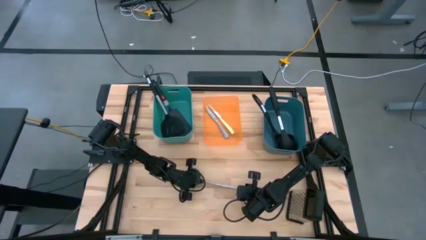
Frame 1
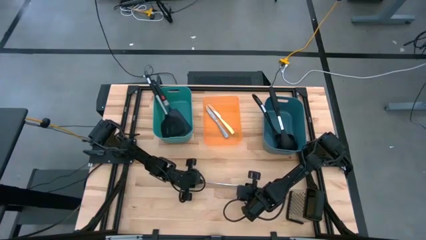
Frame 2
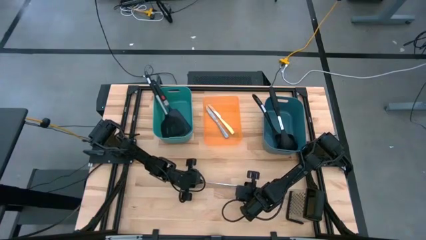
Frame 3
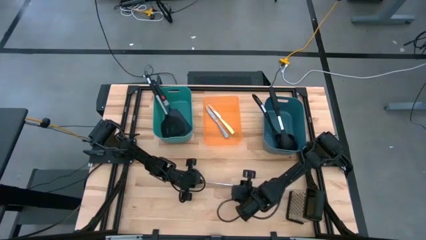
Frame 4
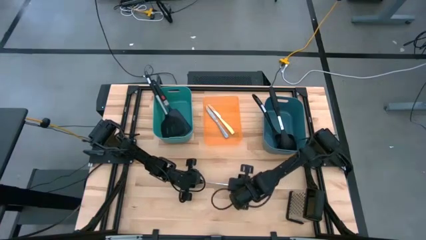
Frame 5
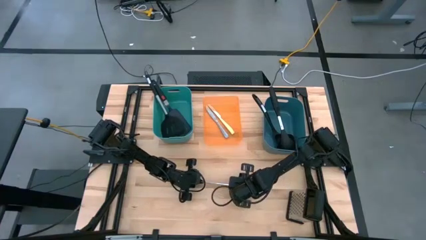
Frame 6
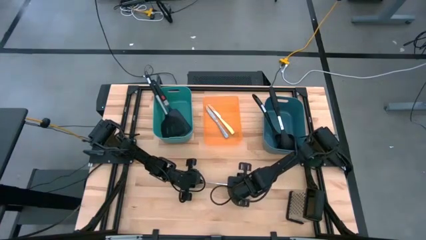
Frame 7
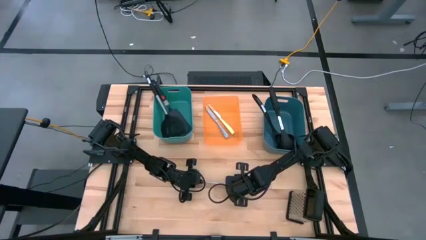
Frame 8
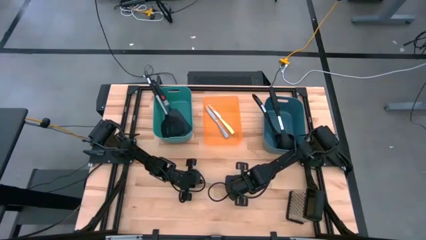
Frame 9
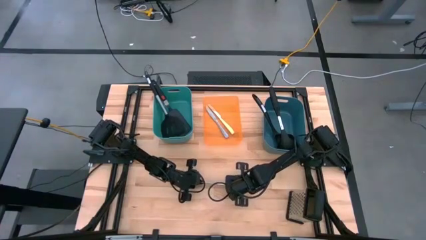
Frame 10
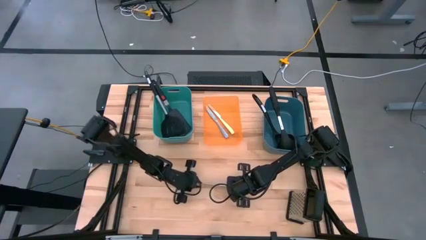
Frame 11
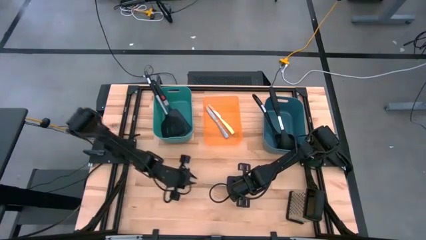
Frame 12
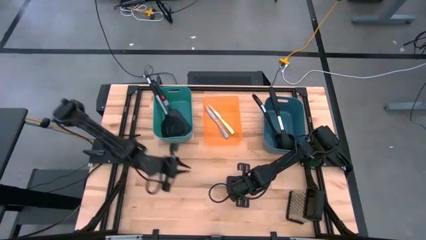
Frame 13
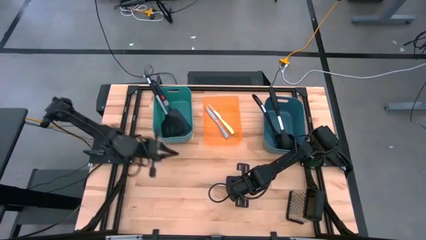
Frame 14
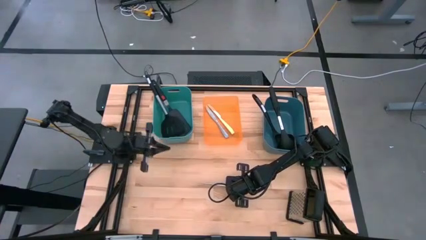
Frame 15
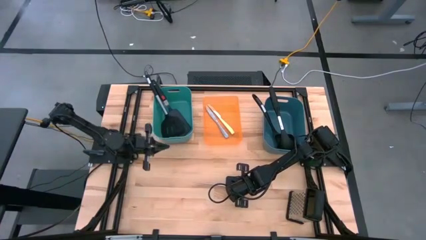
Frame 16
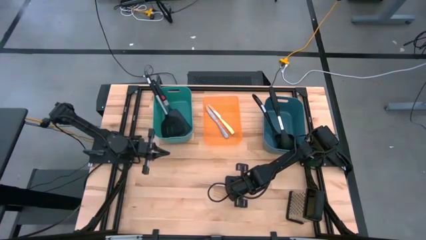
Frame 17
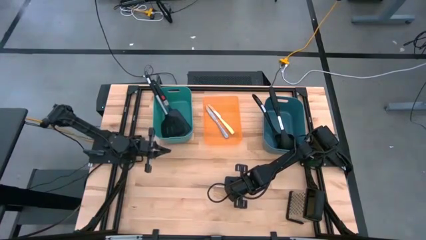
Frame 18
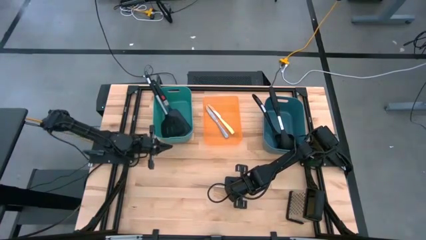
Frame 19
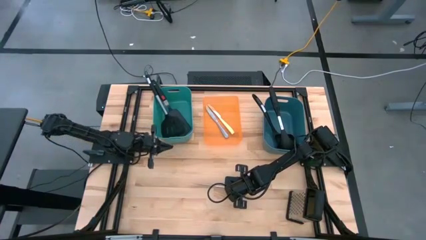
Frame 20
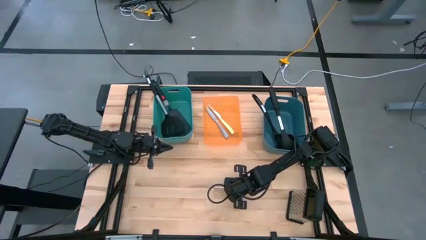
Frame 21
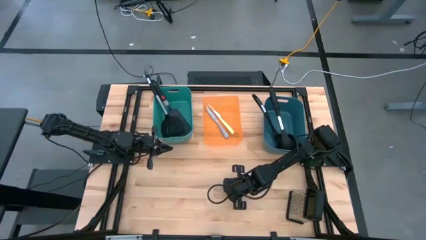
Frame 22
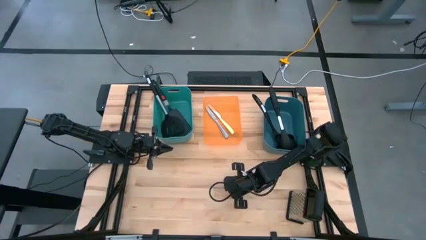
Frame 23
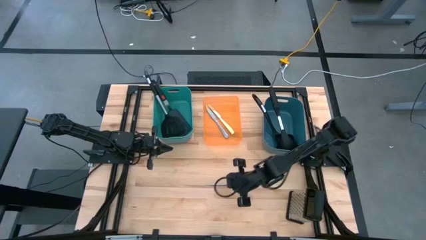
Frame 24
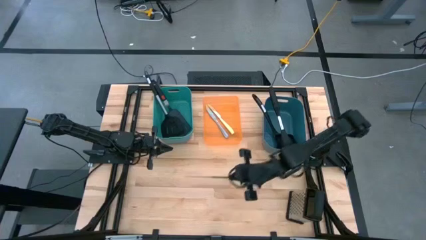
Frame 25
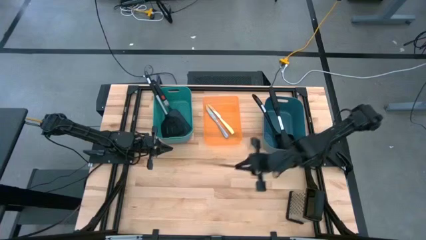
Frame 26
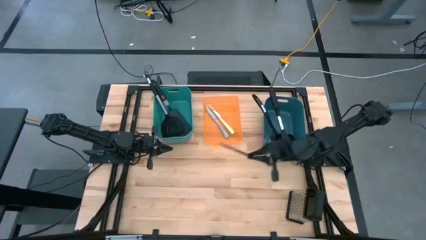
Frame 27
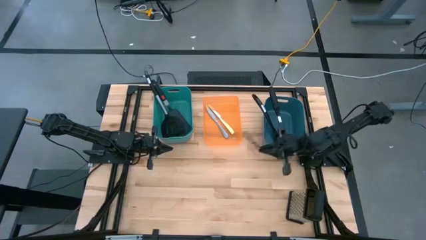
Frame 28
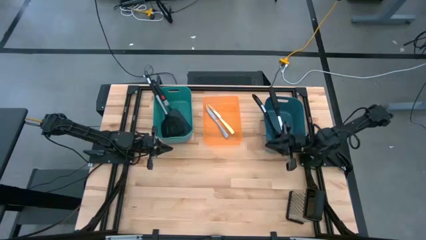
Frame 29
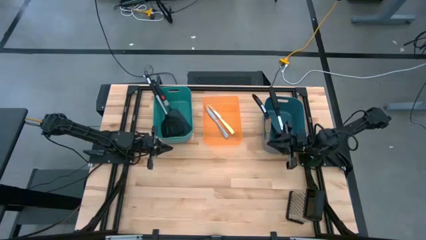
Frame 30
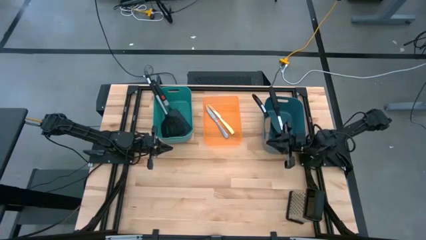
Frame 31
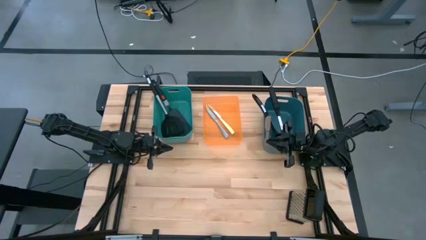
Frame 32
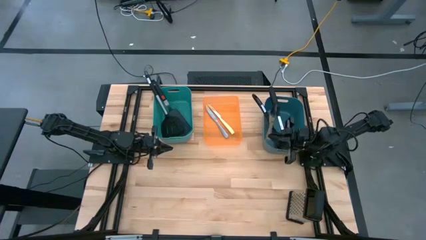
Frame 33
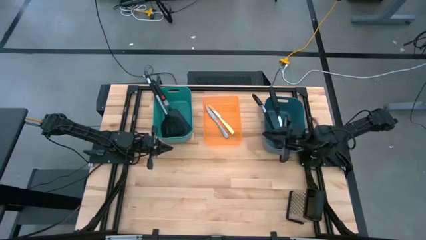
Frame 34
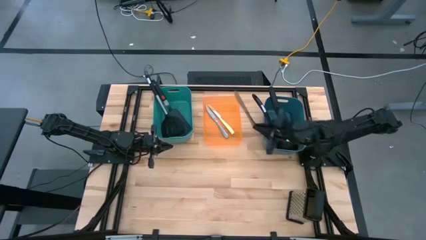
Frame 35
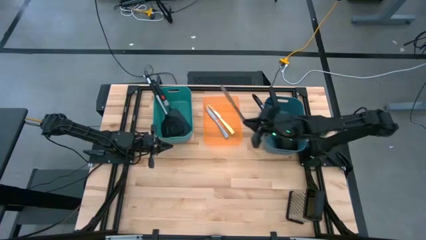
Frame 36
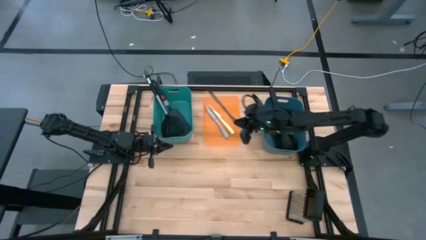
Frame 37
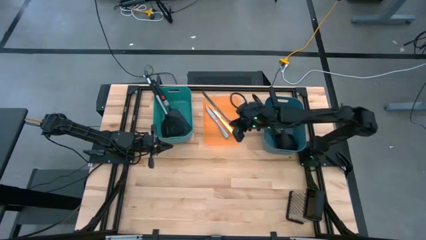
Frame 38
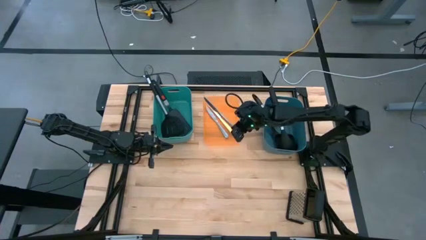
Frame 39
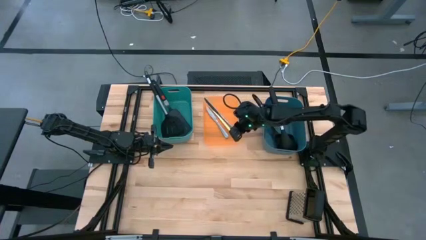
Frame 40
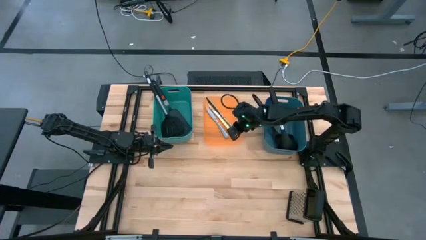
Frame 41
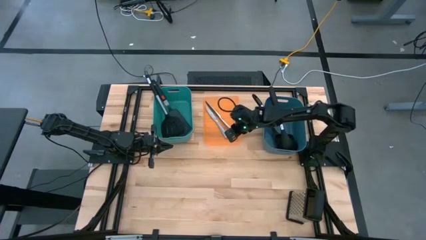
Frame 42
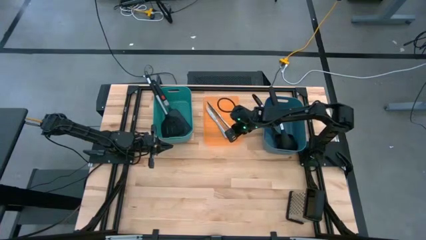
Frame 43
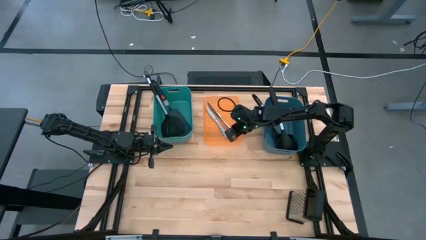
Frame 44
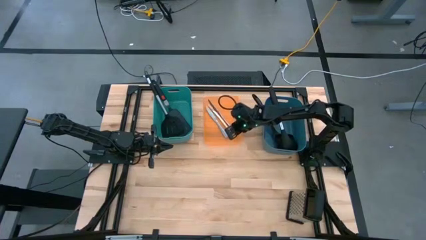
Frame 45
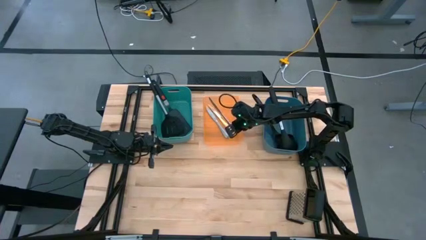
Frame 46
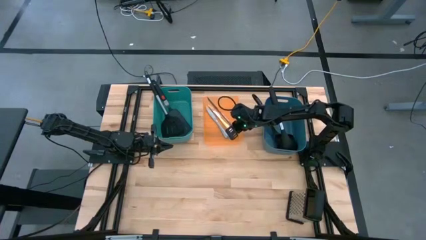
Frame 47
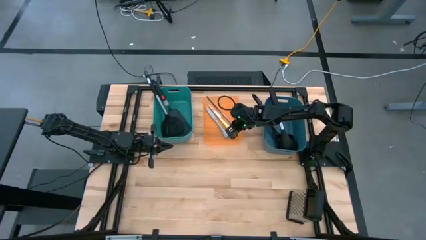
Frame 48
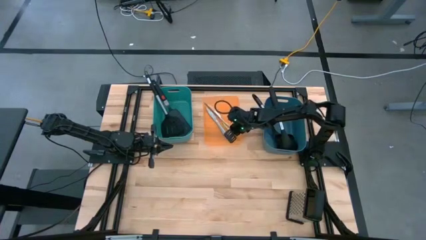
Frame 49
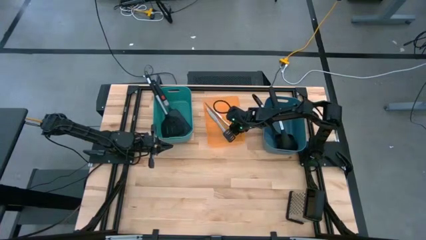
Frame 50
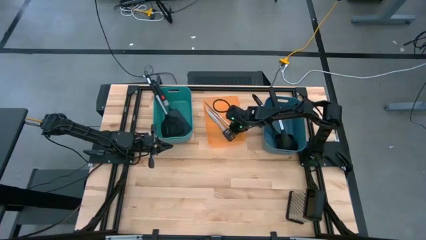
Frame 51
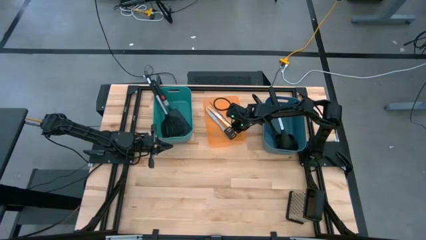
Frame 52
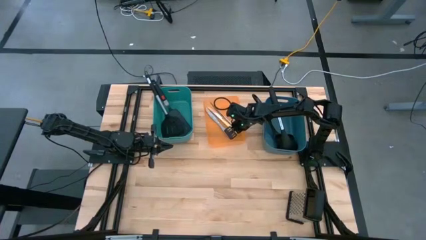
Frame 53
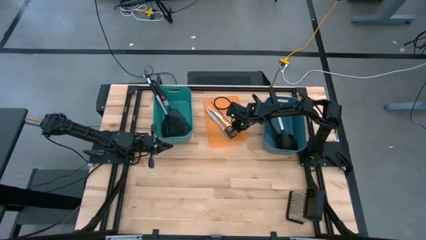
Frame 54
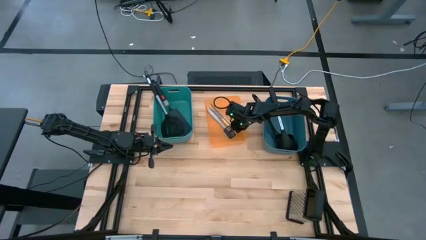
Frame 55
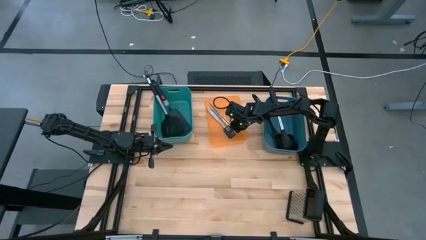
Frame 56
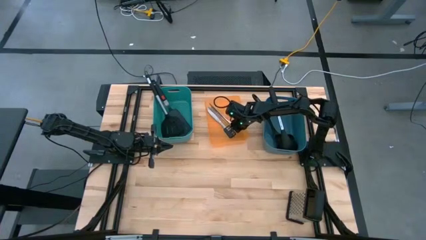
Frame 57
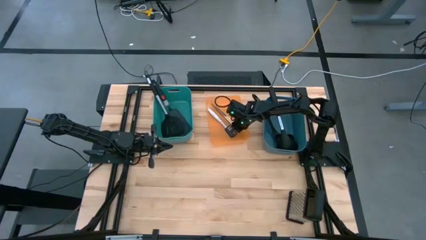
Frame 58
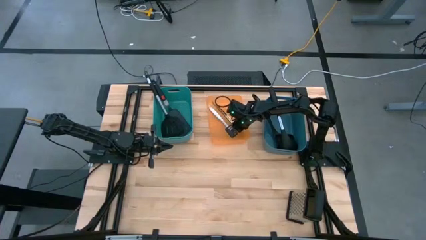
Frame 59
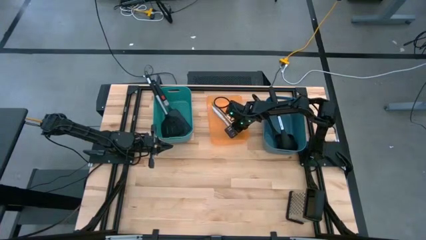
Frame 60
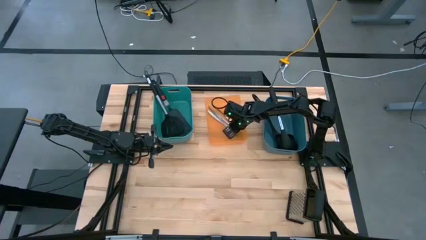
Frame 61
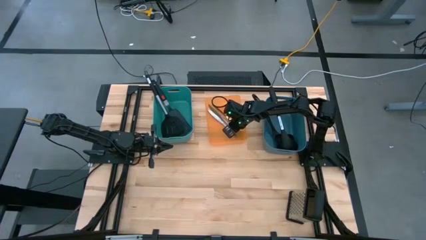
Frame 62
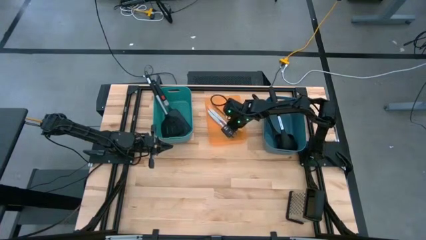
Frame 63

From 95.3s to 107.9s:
Task: Pick & Place Kitchen Items
Put the silver knife into the orange bin

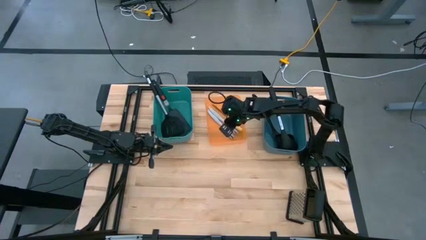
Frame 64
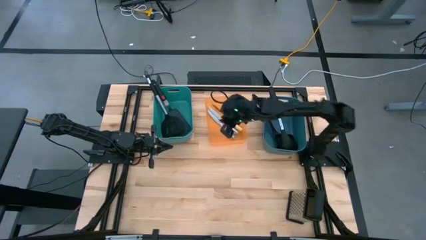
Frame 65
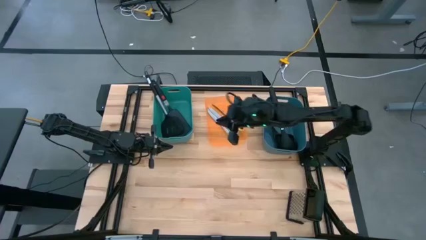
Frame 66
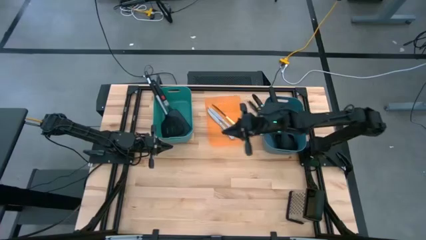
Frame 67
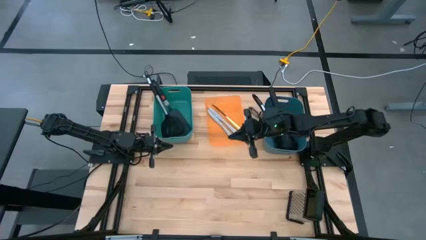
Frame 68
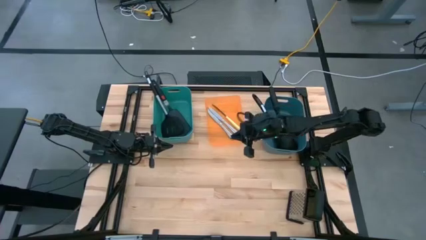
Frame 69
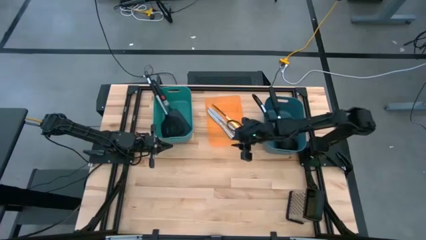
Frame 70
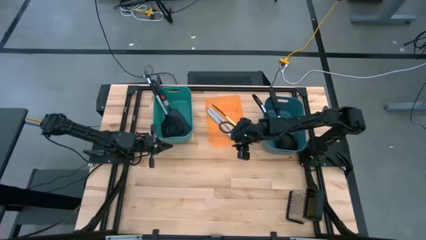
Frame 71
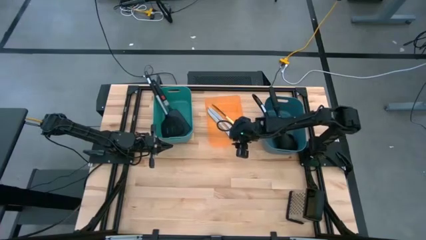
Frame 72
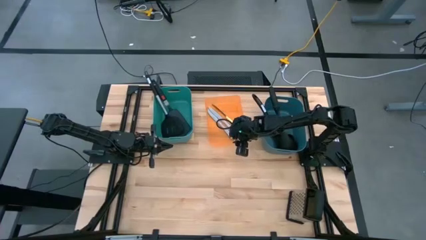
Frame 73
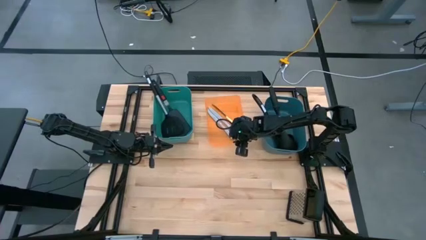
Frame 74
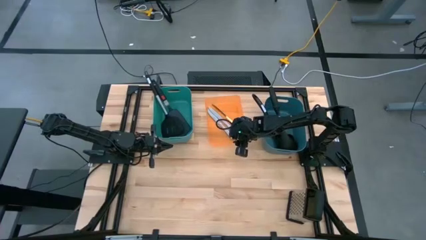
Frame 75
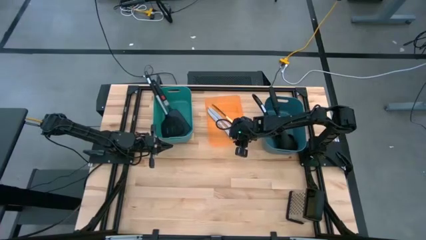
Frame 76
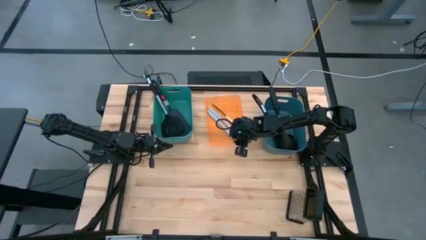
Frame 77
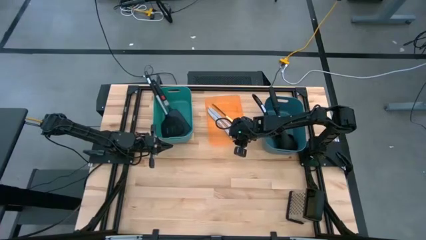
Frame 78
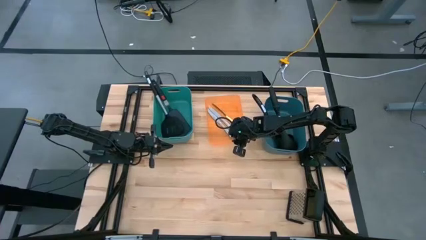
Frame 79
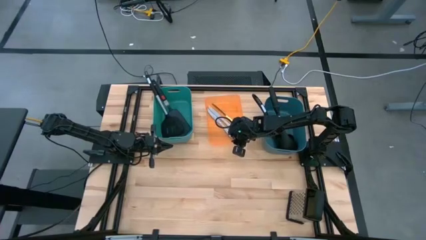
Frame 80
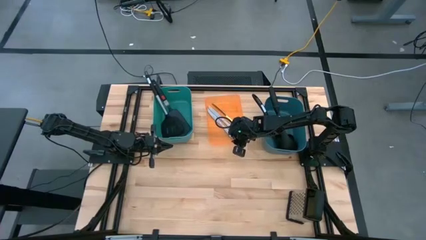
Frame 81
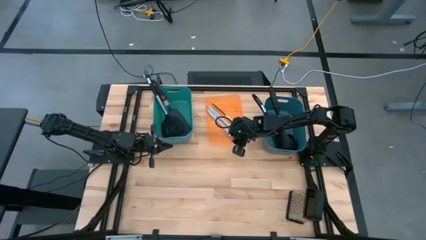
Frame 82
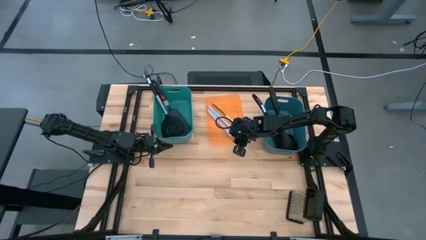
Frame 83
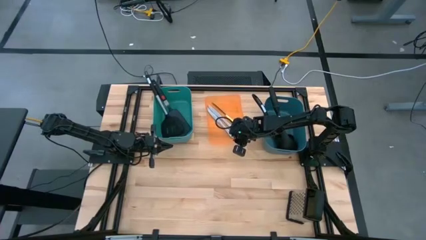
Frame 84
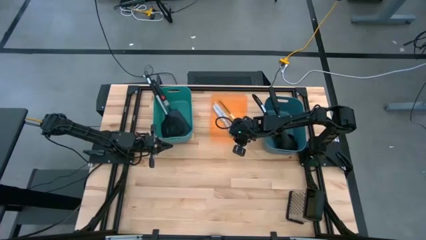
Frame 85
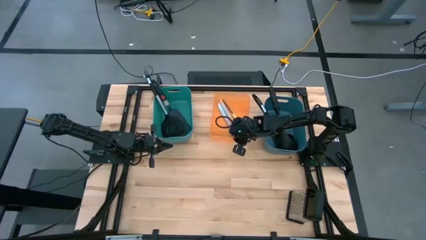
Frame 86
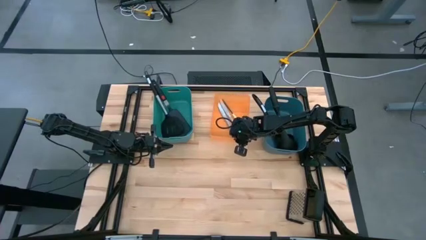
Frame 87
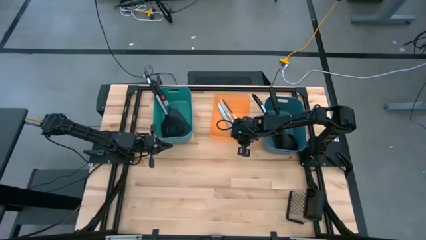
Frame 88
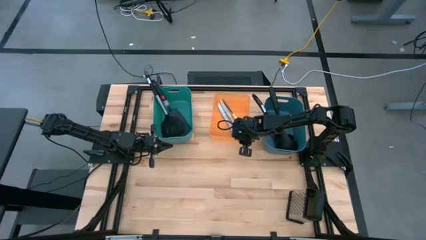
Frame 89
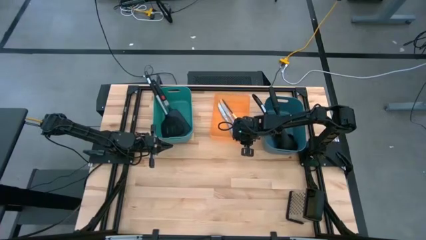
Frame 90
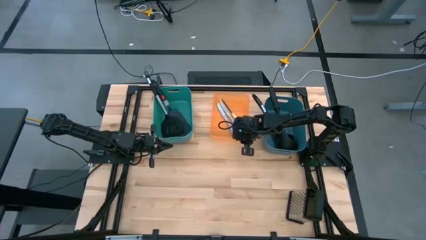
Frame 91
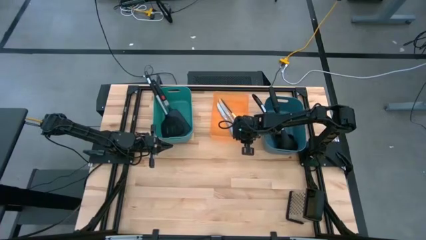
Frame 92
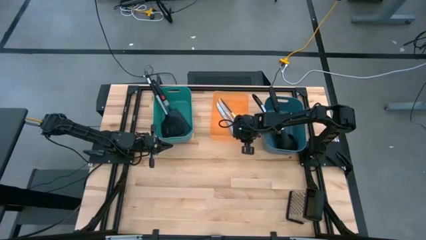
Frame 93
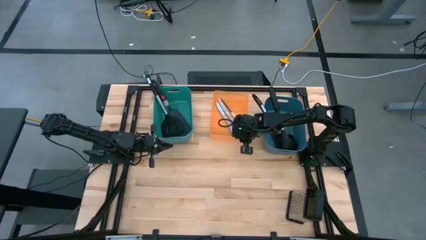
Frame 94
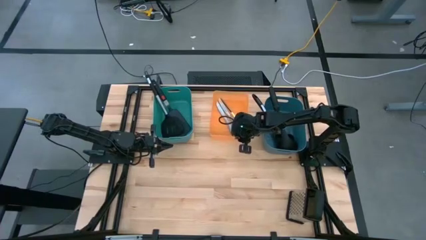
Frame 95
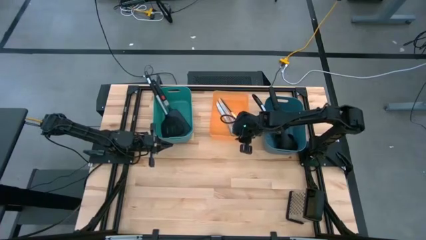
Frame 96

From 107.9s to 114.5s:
Adjust the orange bin
